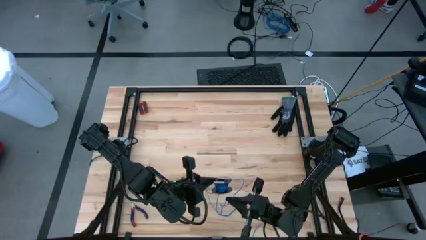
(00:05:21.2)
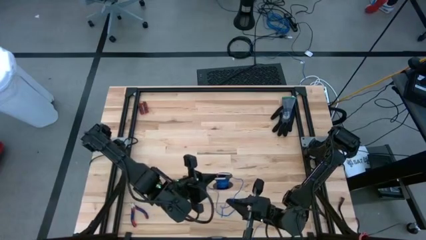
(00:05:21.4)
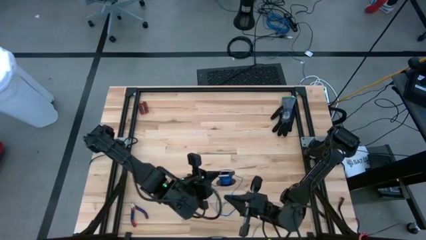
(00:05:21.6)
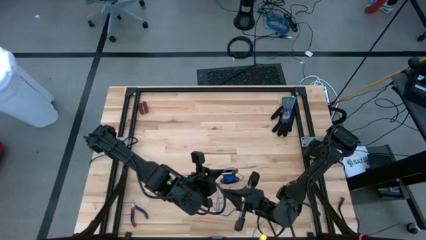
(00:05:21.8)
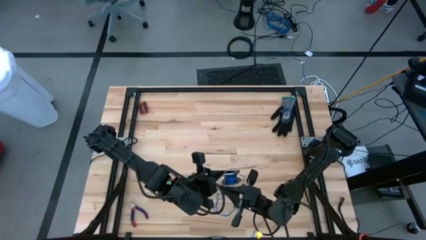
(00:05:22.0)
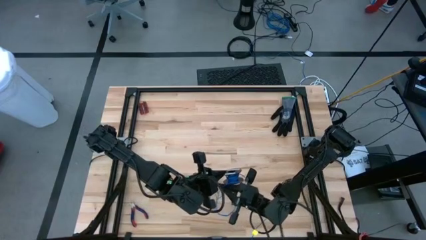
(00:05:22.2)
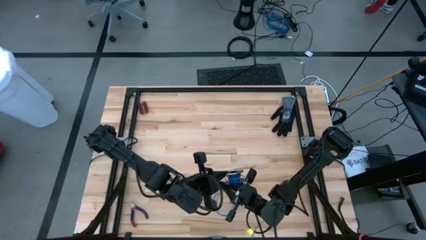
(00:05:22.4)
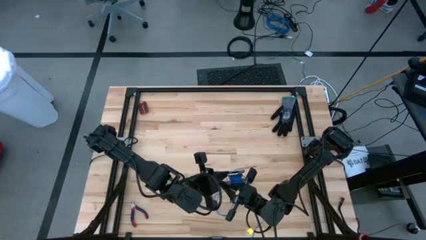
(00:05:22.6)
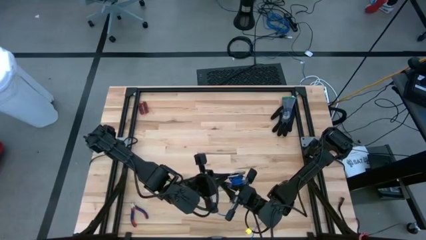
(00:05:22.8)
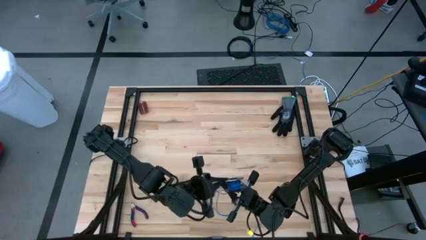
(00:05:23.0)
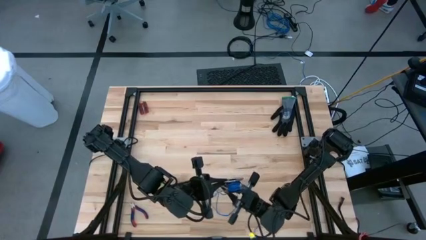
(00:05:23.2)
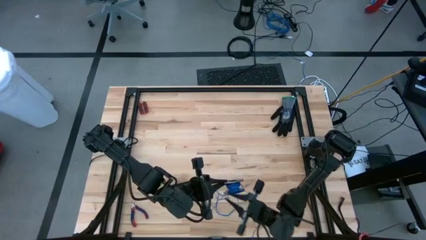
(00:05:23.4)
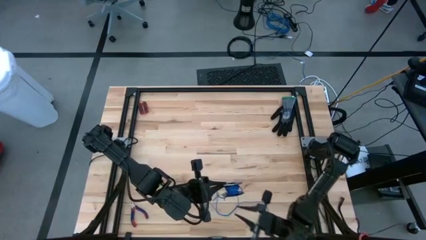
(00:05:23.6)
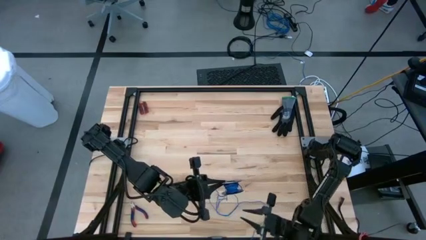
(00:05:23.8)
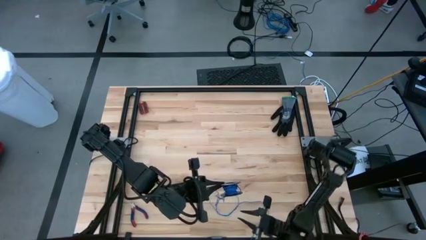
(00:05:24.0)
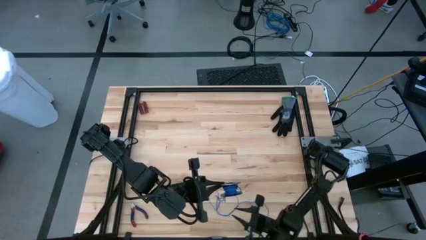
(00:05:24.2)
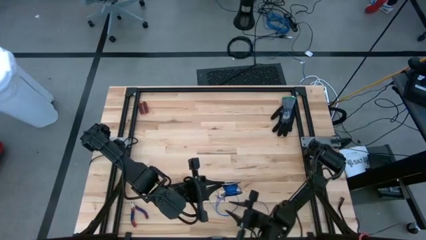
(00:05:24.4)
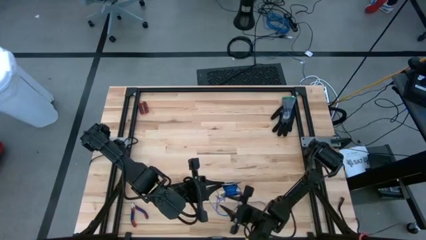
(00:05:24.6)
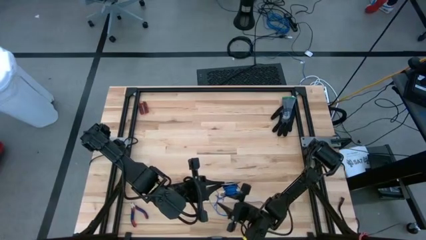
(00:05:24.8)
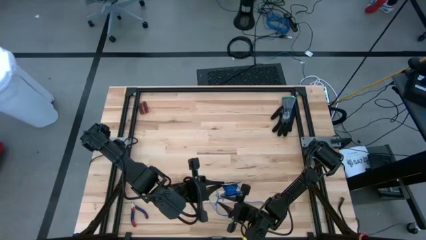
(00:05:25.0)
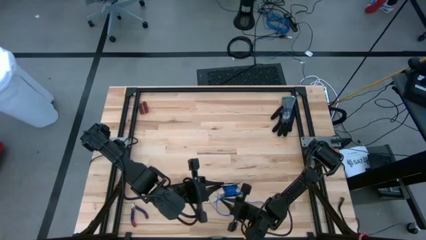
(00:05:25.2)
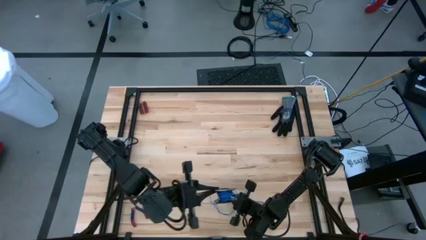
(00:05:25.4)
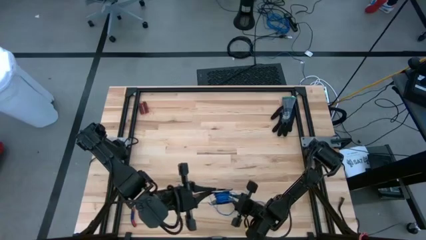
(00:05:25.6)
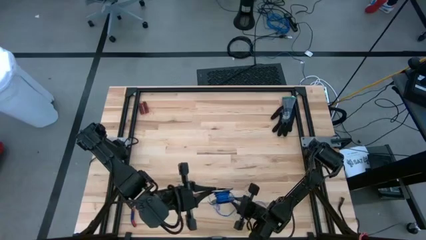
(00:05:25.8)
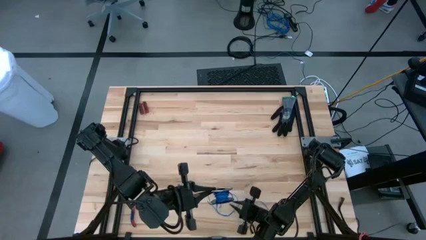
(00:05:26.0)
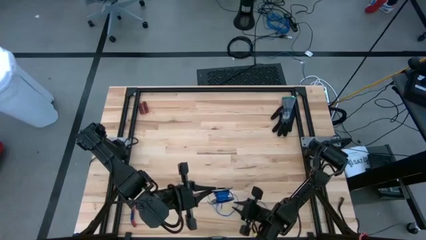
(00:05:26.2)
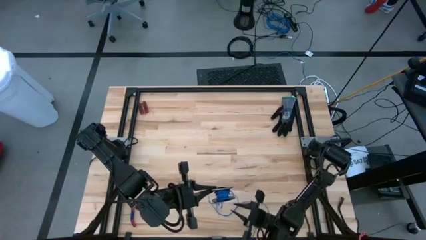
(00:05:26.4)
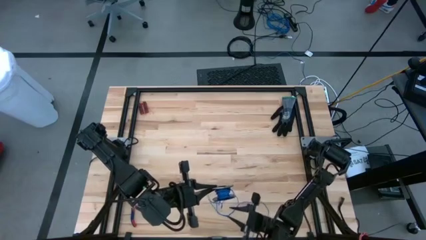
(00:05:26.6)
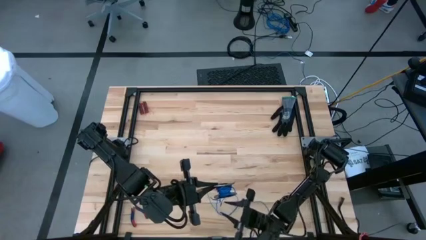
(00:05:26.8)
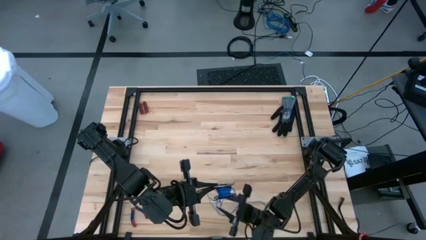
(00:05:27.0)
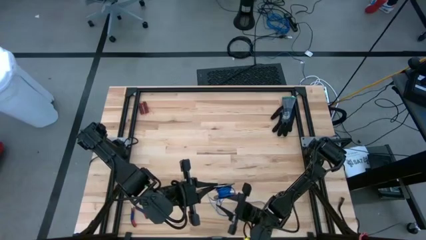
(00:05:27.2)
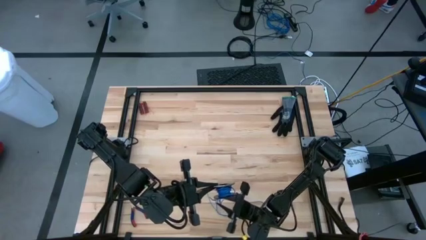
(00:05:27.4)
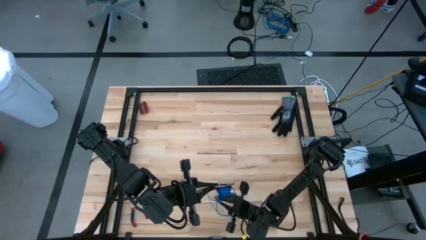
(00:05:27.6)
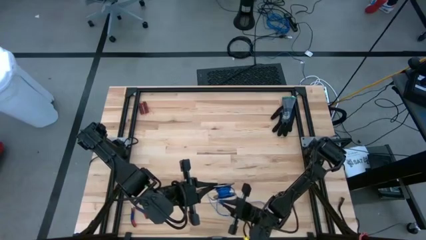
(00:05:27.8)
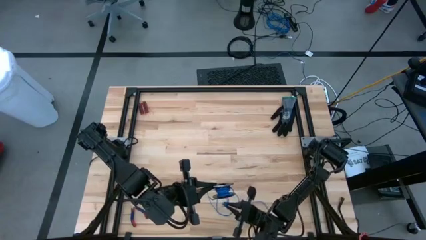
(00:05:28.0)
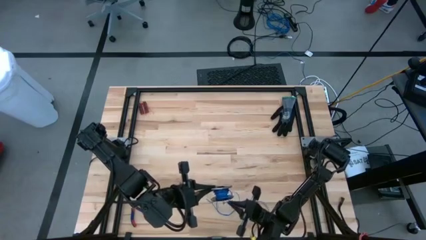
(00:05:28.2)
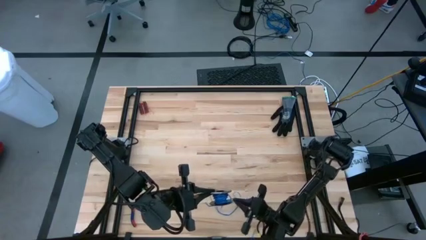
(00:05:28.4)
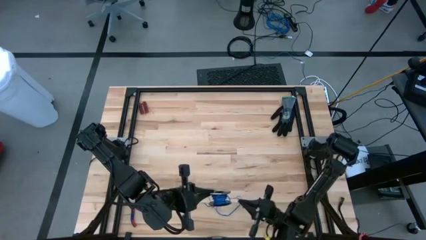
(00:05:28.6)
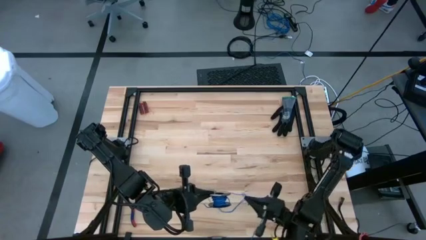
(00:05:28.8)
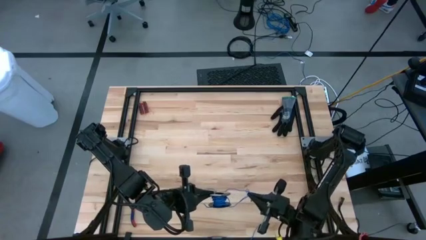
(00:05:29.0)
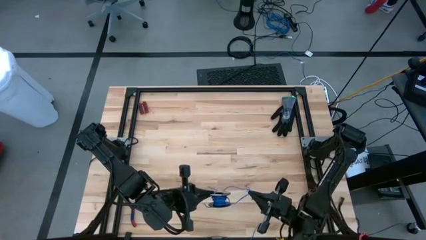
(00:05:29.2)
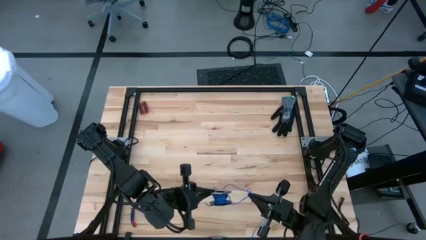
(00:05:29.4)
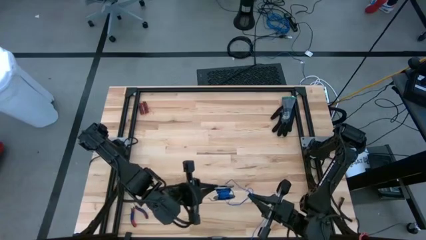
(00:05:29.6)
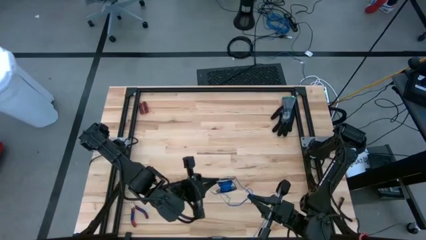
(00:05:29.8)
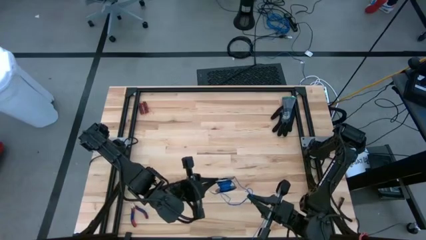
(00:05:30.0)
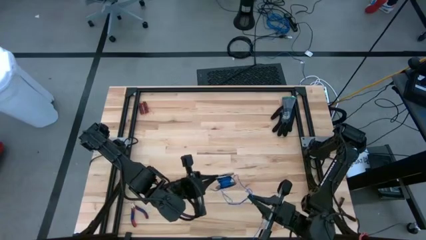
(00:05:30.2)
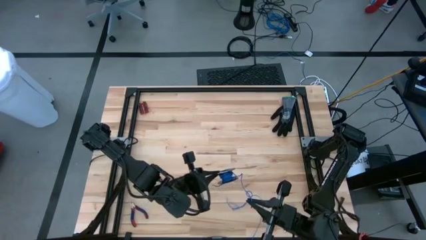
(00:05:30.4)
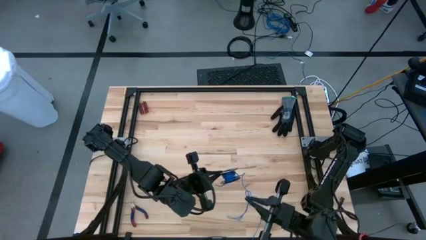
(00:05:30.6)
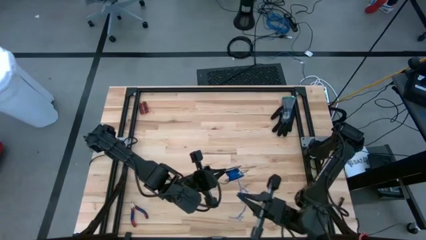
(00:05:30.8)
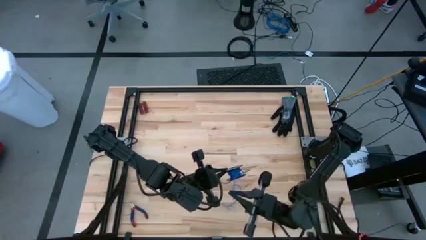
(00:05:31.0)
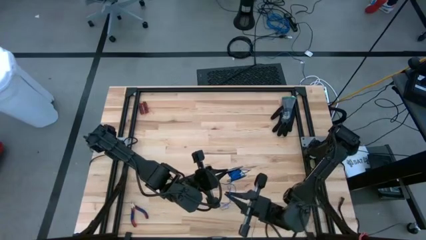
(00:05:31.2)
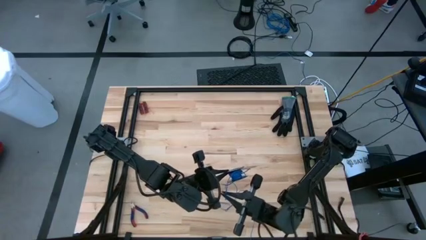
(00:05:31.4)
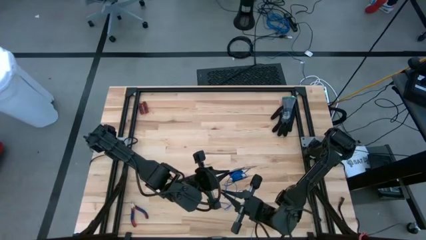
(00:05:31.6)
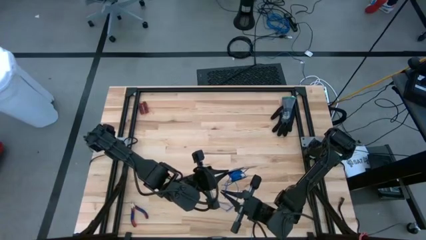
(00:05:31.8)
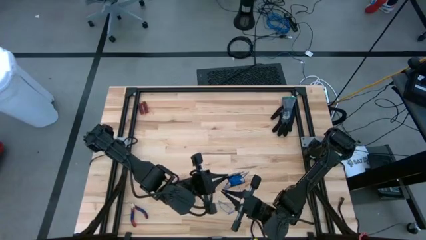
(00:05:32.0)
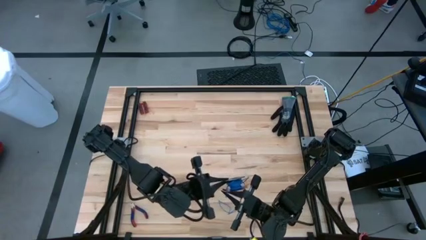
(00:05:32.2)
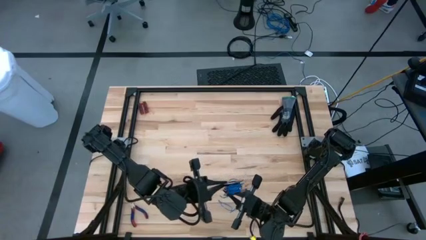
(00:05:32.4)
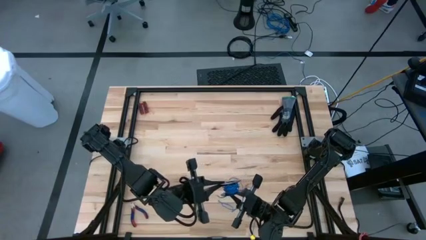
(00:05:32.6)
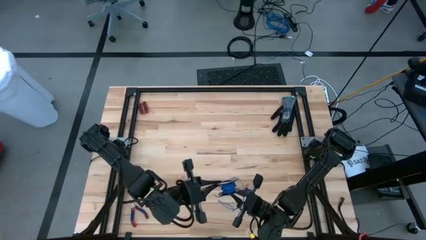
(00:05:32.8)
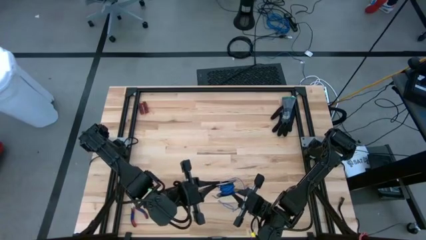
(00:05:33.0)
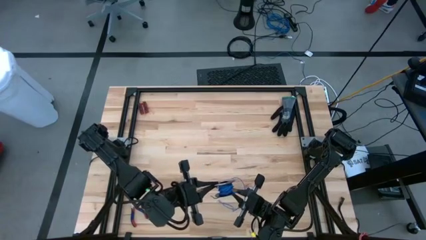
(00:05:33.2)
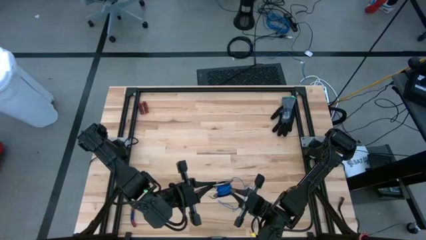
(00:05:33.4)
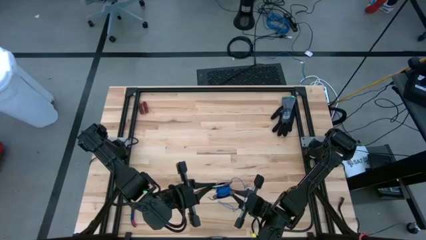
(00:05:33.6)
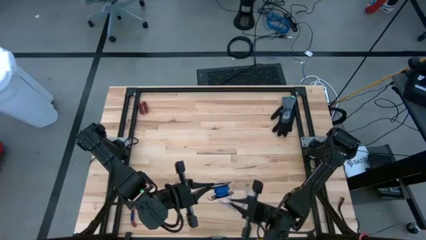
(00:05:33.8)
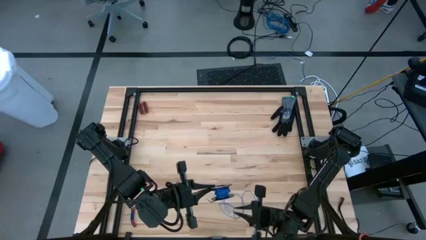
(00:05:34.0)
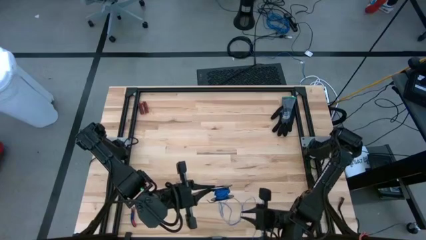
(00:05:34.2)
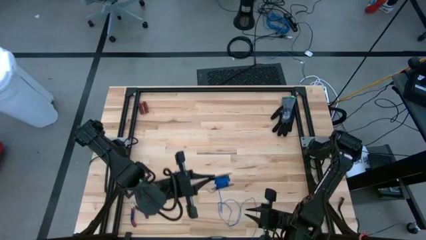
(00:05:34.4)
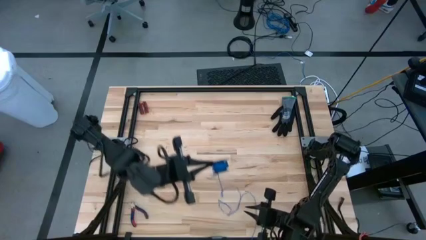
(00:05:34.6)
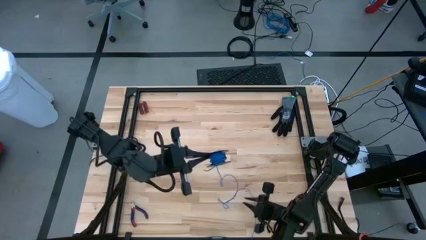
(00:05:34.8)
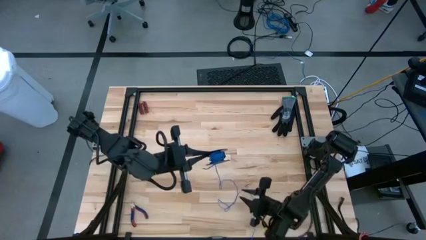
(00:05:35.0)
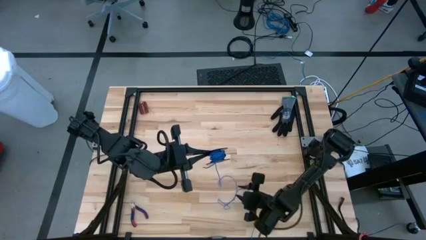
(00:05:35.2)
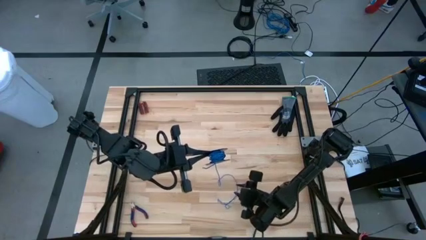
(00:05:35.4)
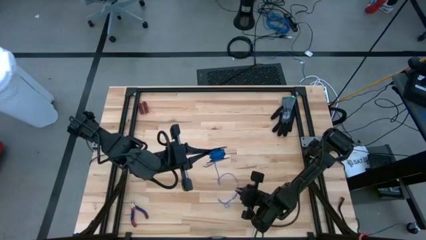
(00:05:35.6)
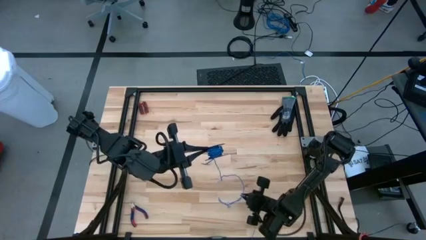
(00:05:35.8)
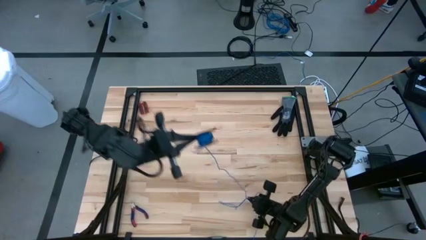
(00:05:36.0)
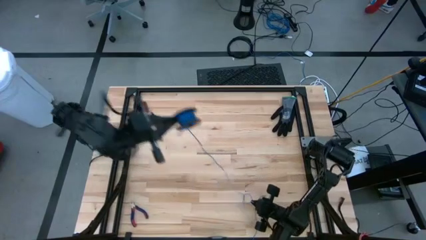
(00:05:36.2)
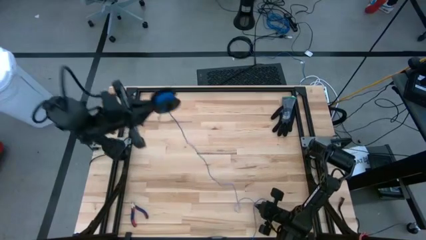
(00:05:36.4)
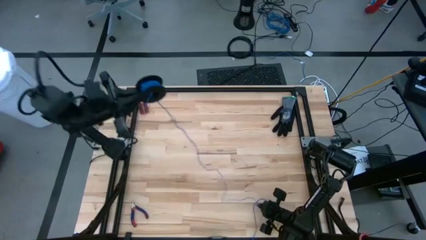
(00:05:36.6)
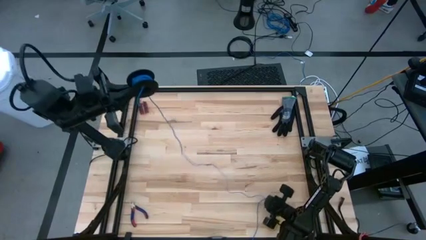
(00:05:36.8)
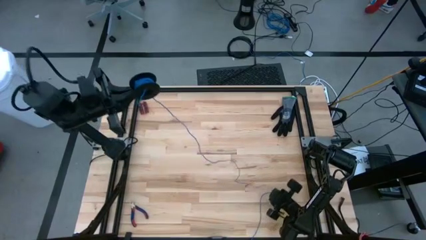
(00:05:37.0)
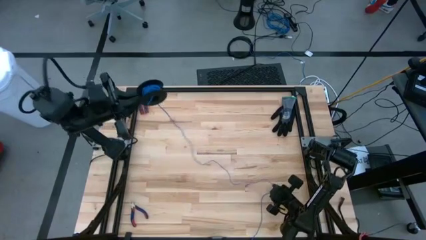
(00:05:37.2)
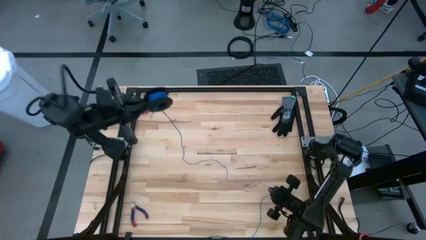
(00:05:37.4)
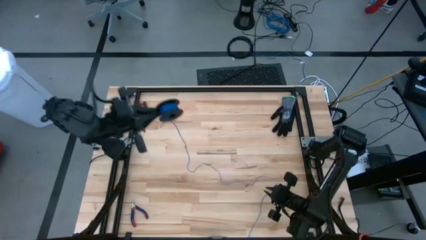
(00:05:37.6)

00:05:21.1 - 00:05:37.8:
Task: Coil cords
Coil the blue wire onto a spool
